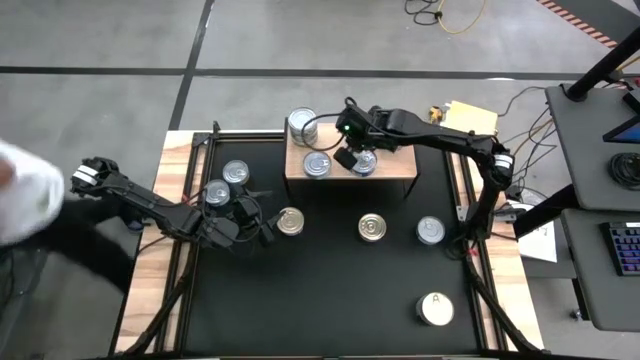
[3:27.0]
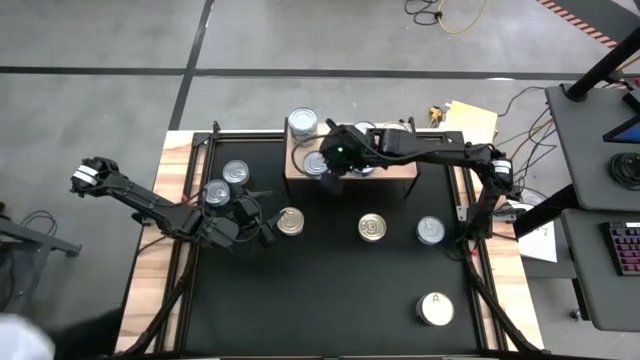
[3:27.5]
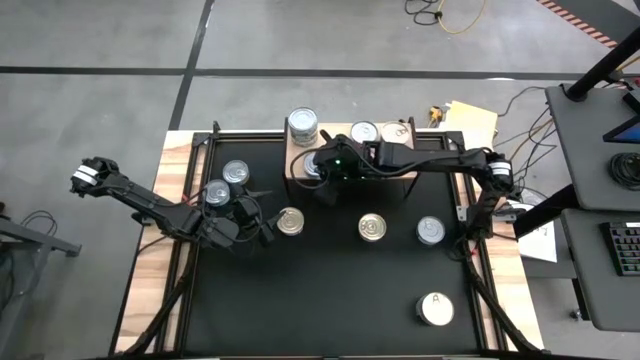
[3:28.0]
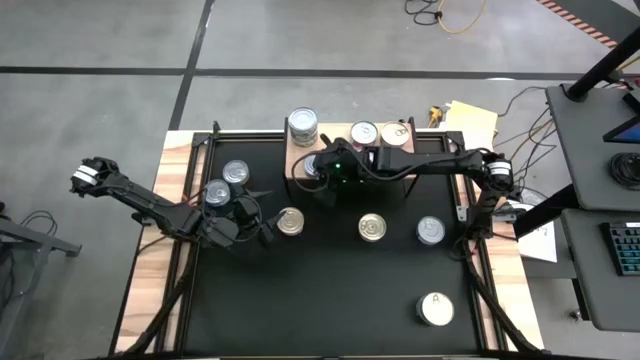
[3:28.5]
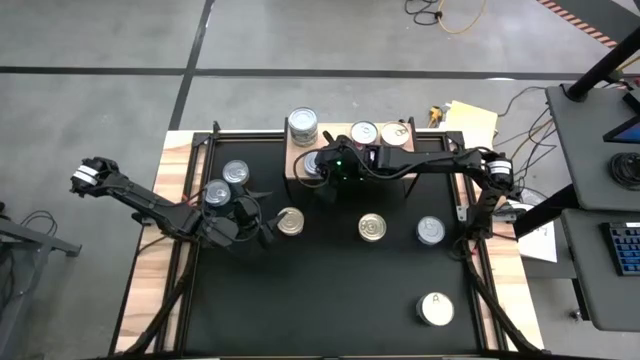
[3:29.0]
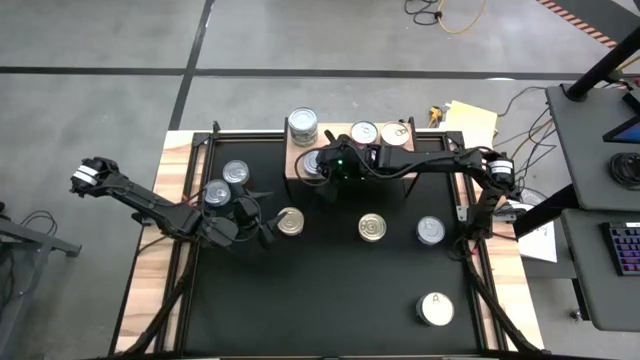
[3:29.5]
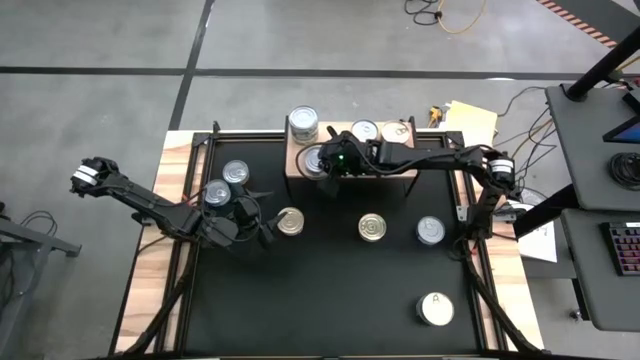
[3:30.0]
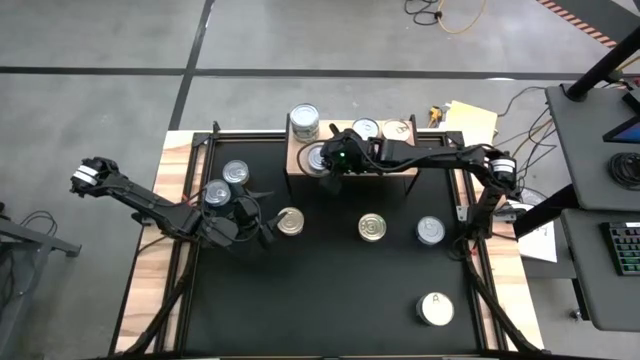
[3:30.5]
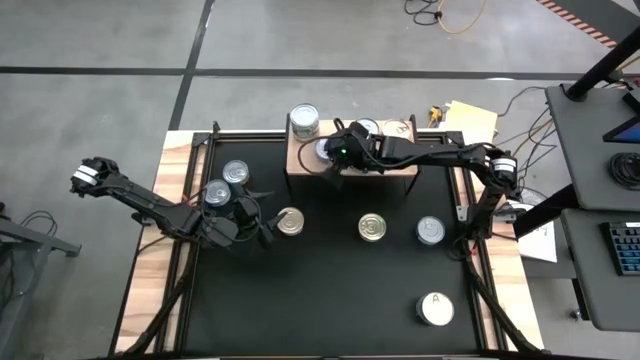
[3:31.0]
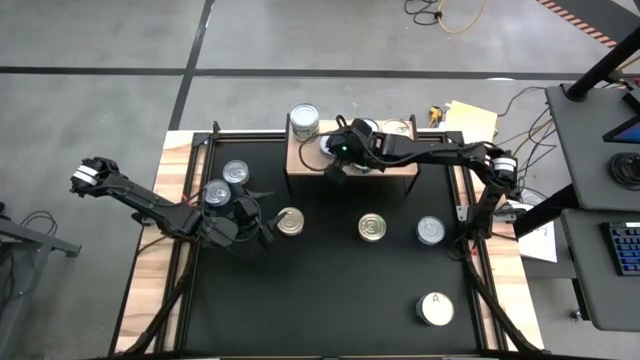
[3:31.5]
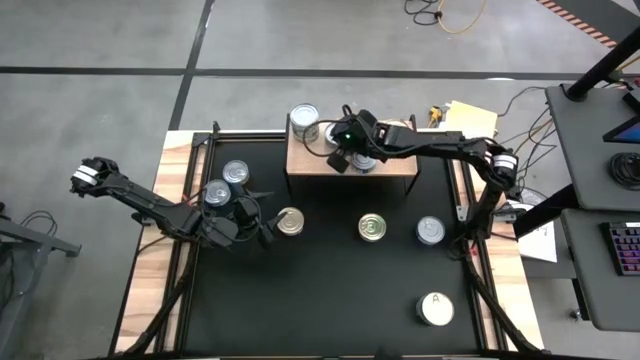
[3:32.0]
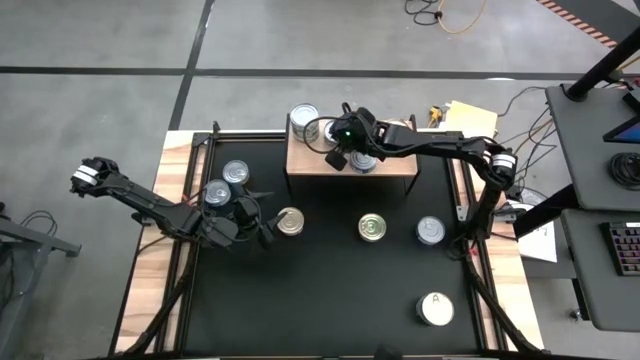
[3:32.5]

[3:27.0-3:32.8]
Task: Stack canned seafood by type on shelf
Adjust the green tuna can on the shelf

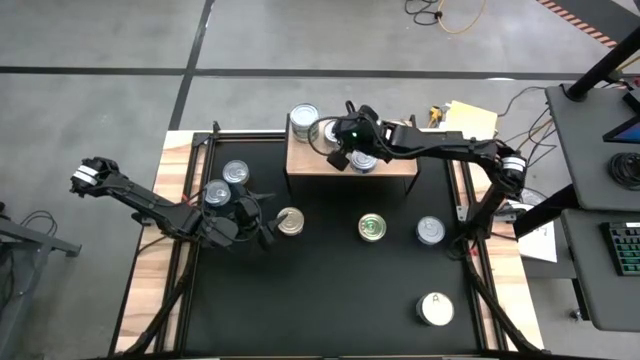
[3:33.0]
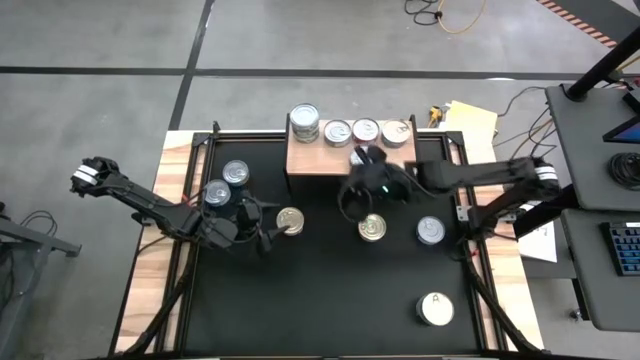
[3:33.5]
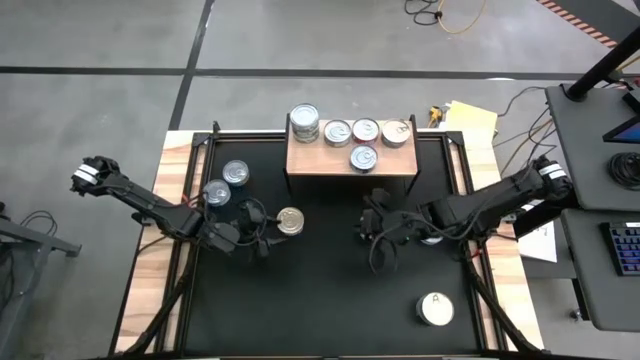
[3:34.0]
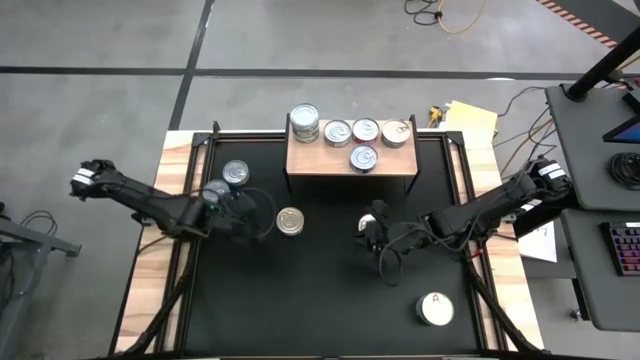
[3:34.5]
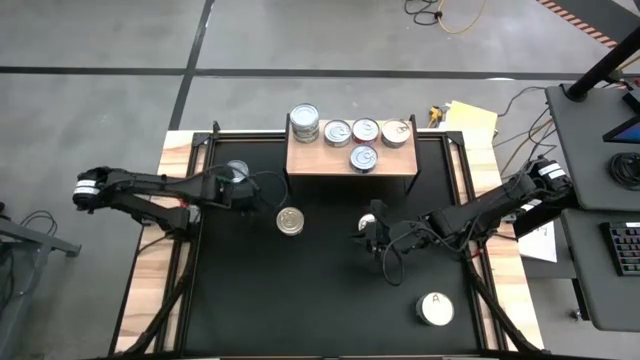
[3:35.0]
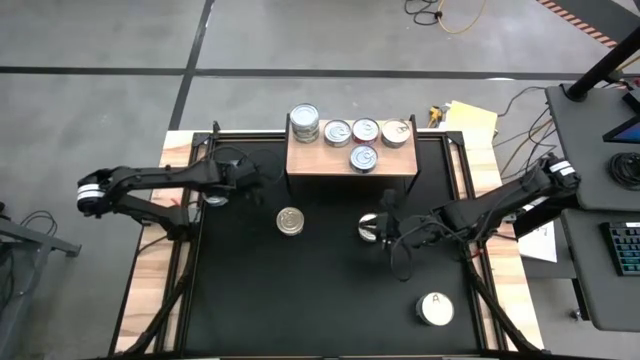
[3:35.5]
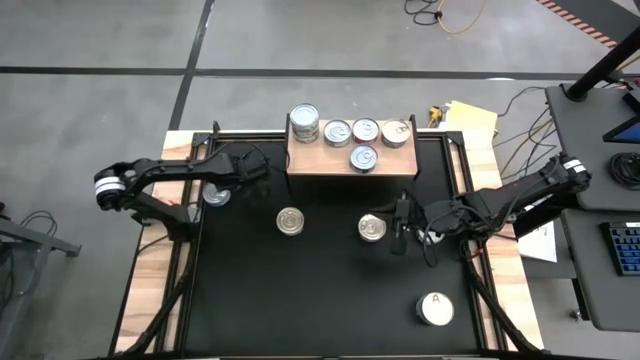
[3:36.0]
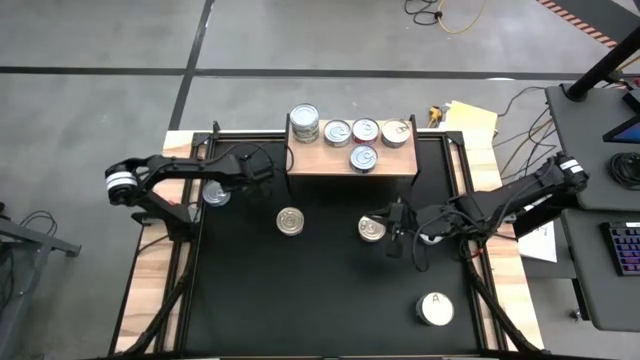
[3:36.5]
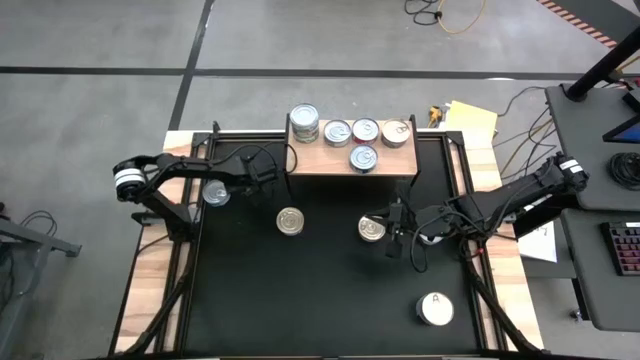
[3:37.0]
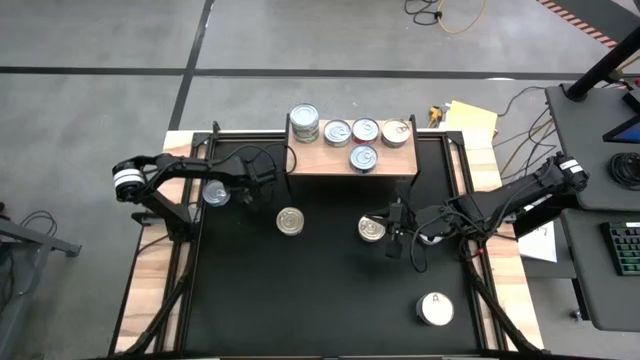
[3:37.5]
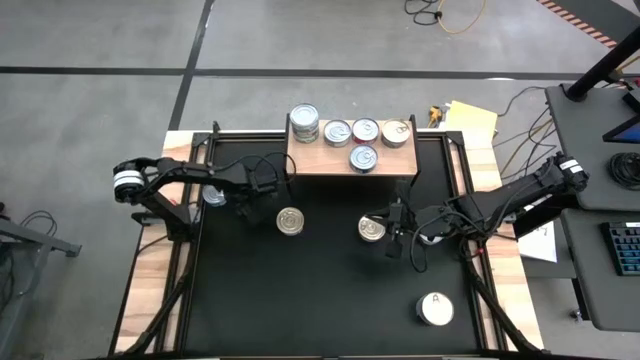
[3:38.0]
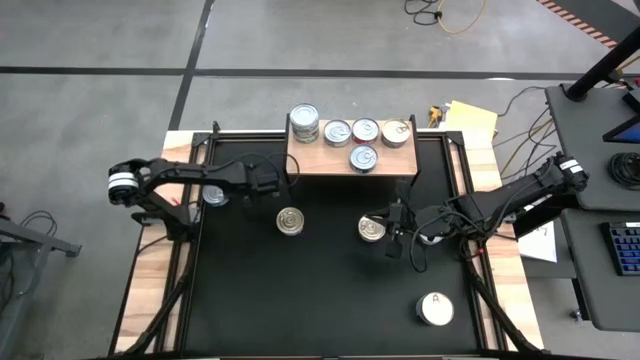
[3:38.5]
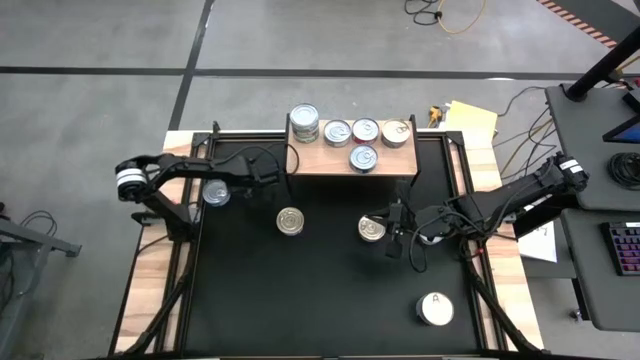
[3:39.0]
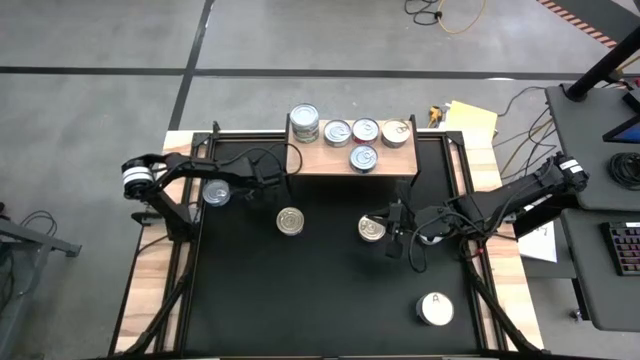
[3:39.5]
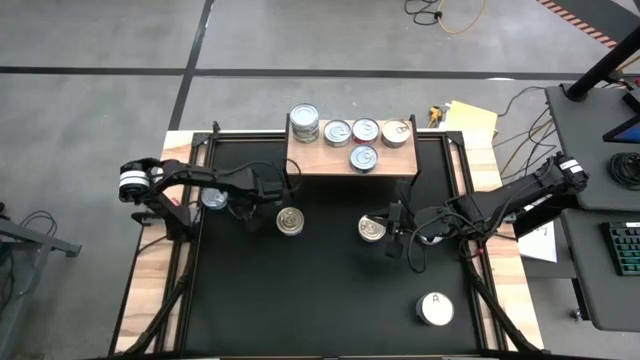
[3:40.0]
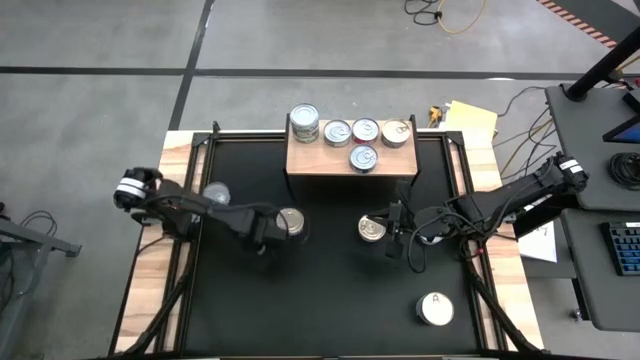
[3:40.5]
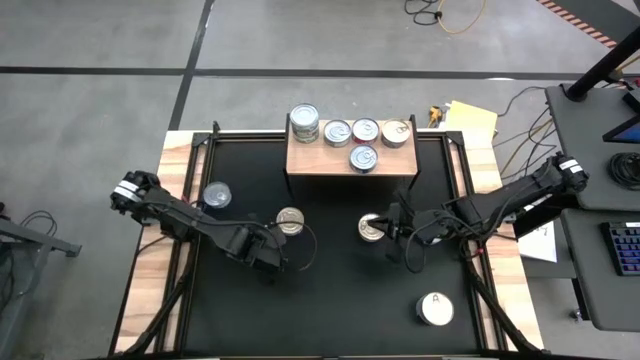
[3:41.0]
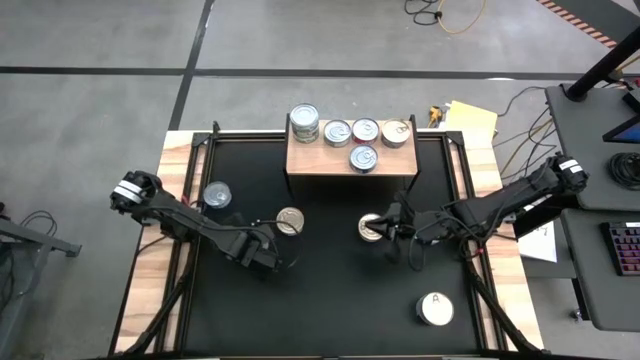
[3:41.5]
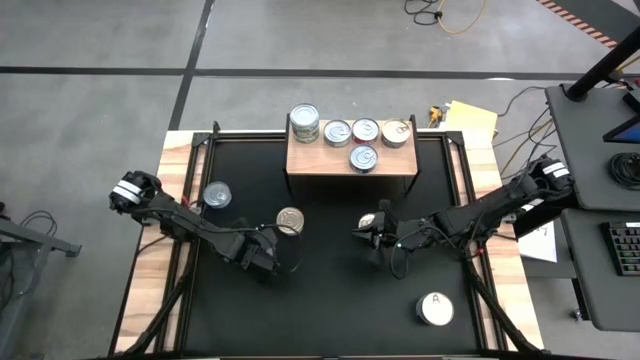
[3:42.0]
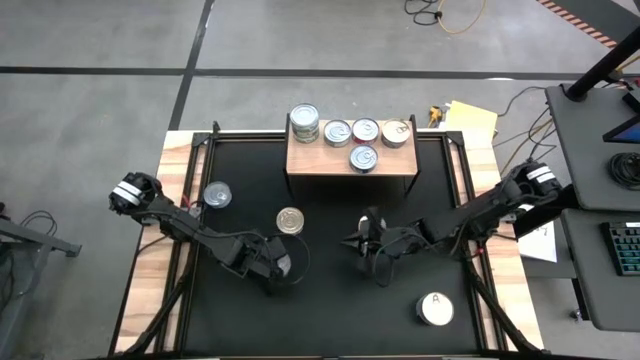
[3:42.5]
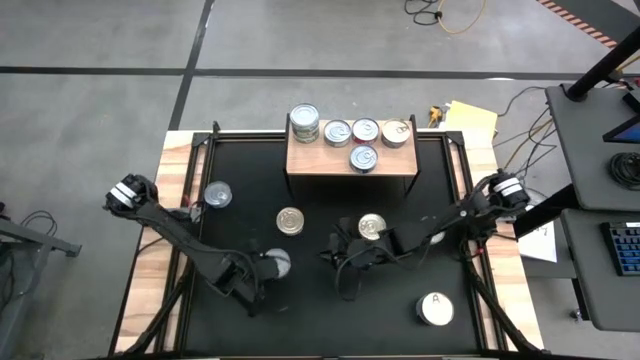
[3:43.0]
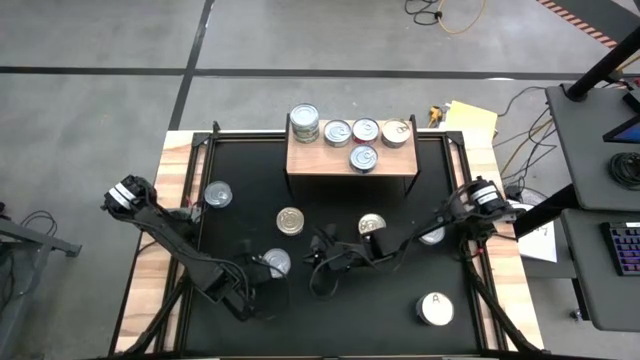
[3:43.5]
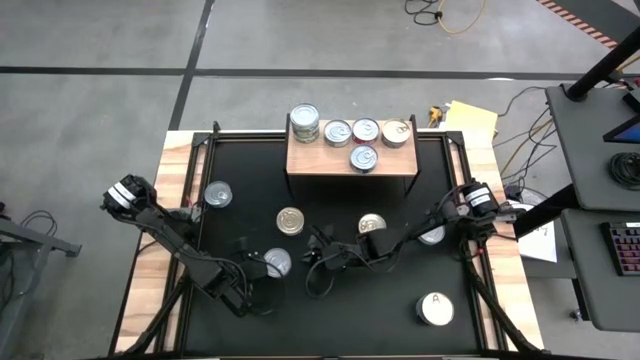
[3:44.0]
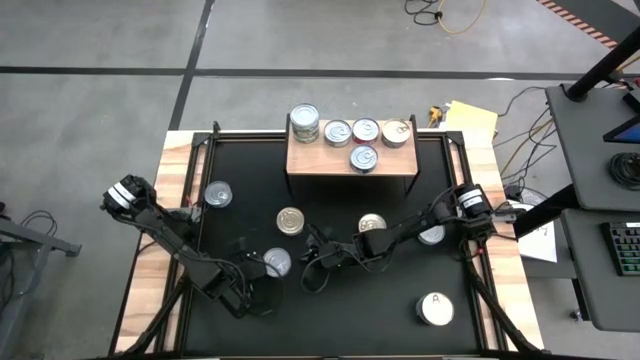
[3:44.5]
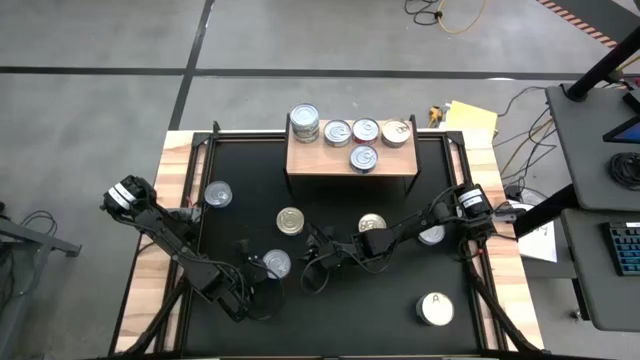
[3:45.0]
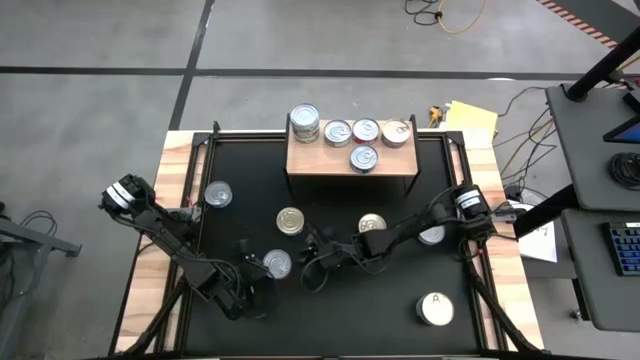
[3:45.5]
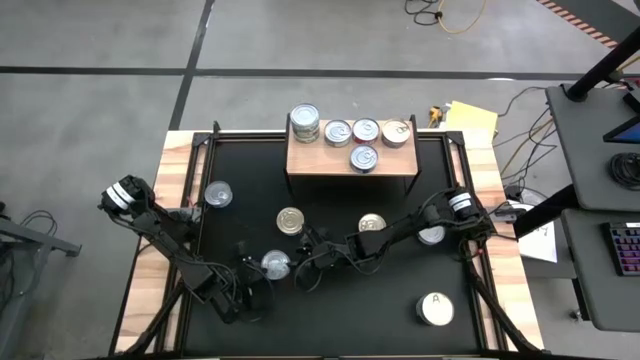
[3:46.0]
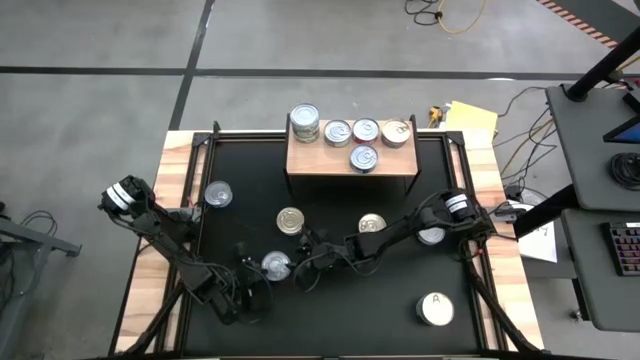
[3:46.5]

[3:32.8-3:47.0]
Put the yellow tuna can on the shelf

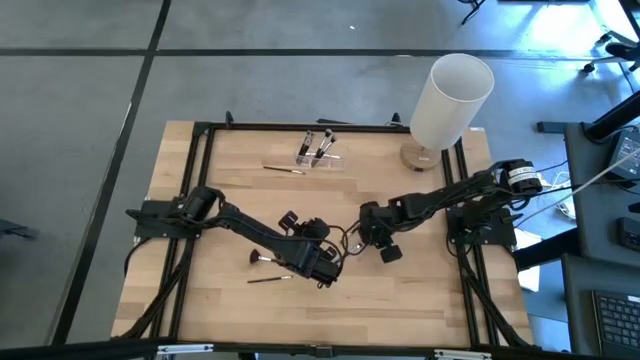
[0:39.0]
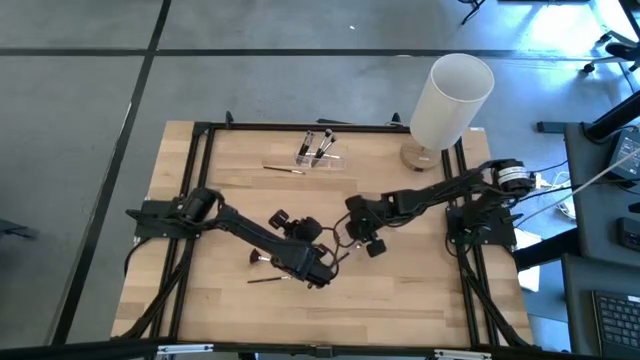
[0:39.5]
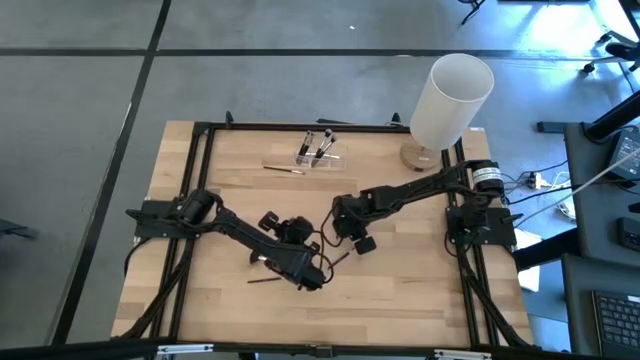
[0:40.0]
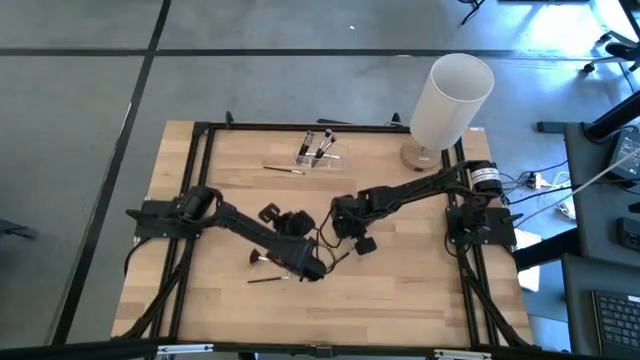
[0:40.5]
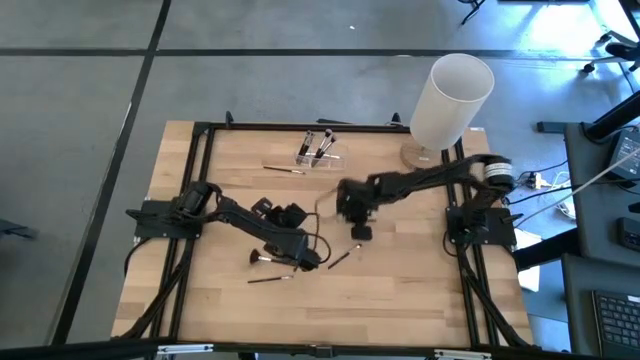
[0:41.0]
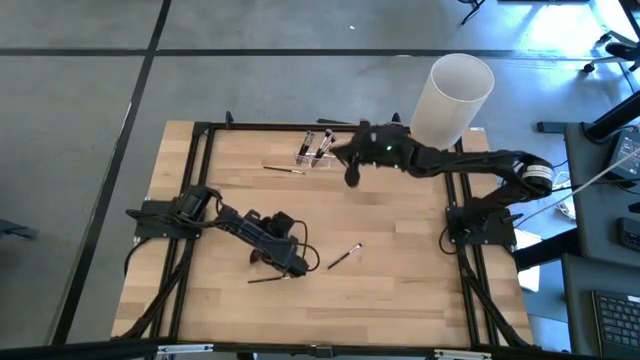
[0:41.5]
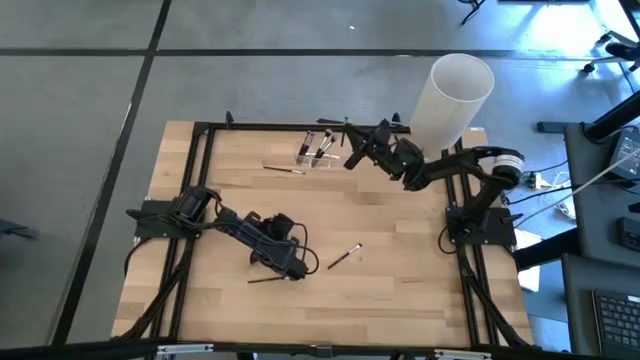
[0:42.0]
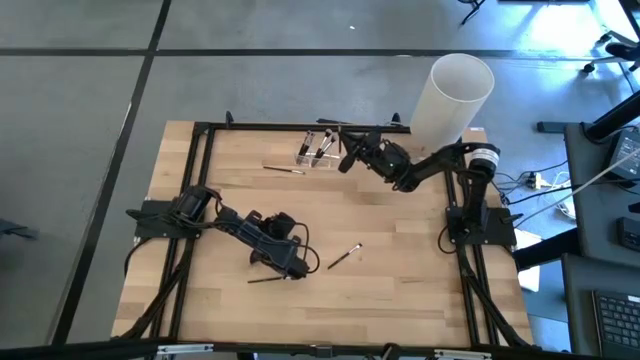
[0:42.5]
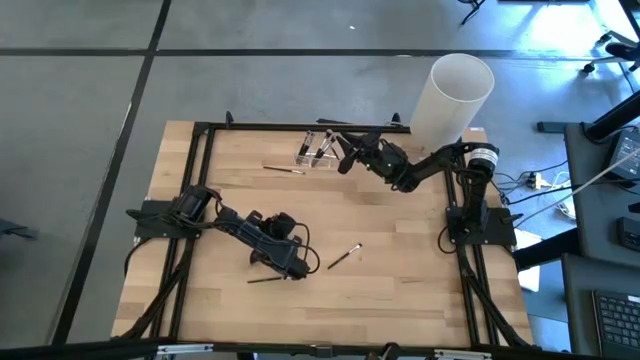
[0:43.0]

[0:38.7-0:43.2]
Task: Pick & Place Makeup Brushes
Put the eyeshadow brush into the transparent organizer
